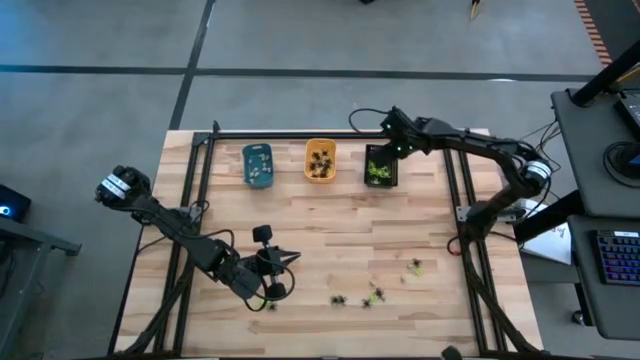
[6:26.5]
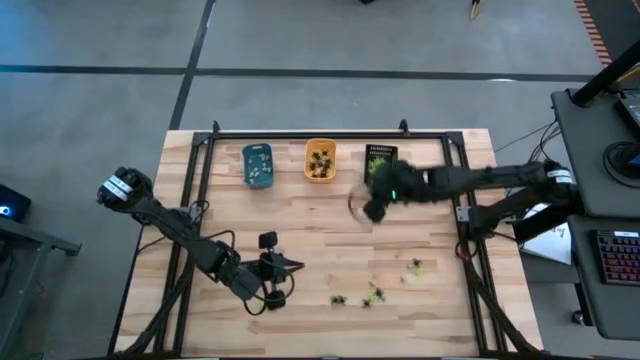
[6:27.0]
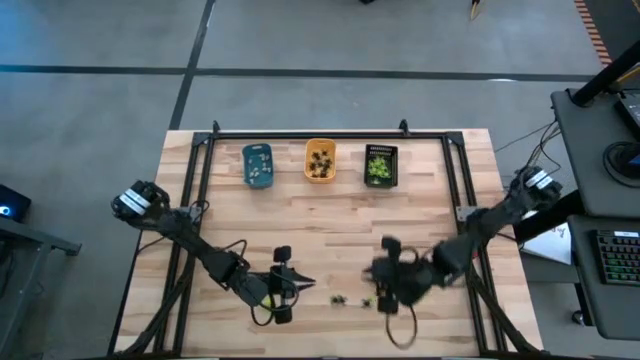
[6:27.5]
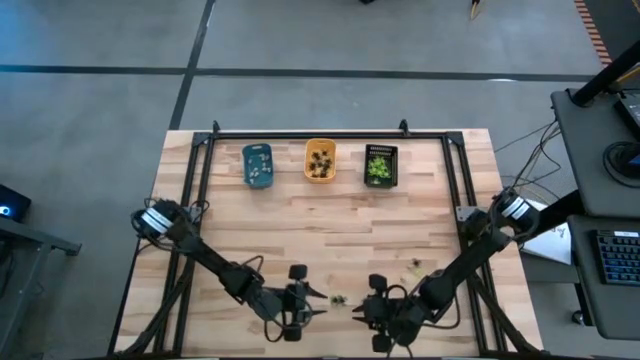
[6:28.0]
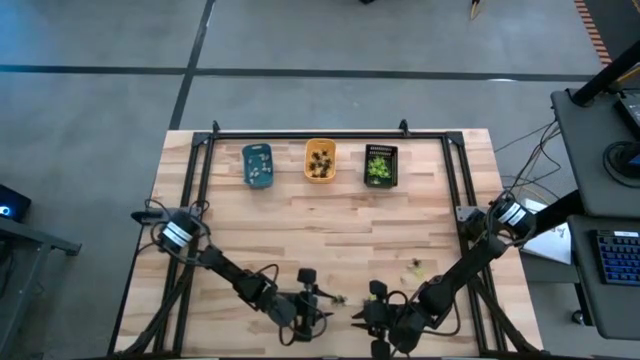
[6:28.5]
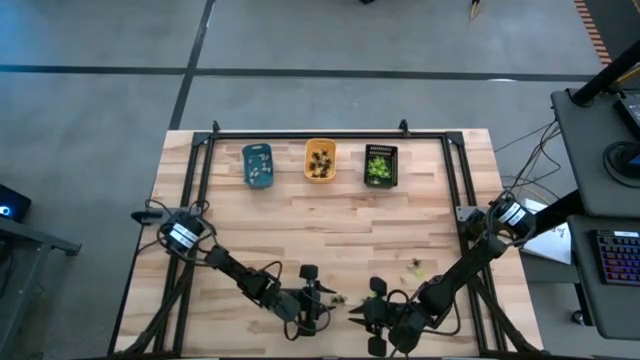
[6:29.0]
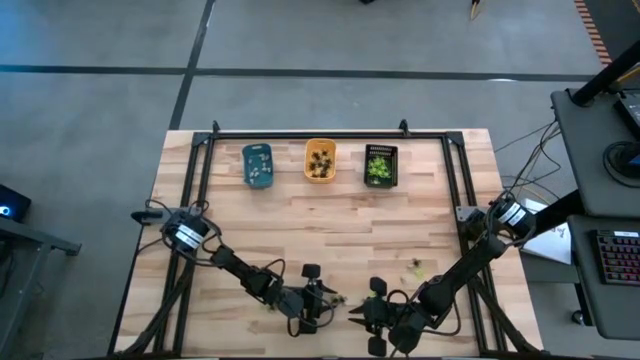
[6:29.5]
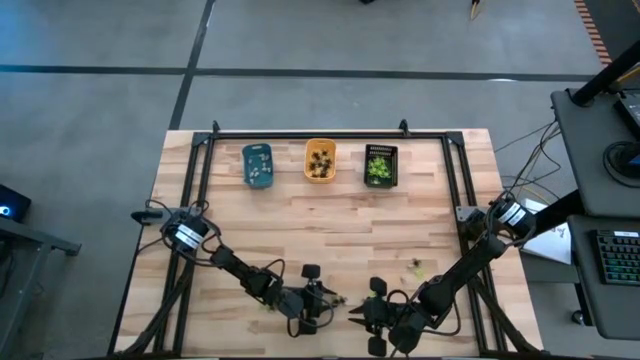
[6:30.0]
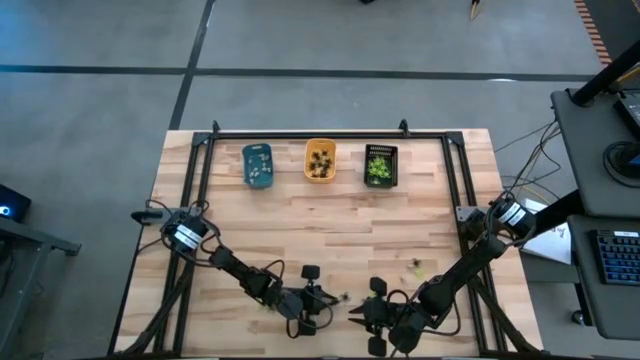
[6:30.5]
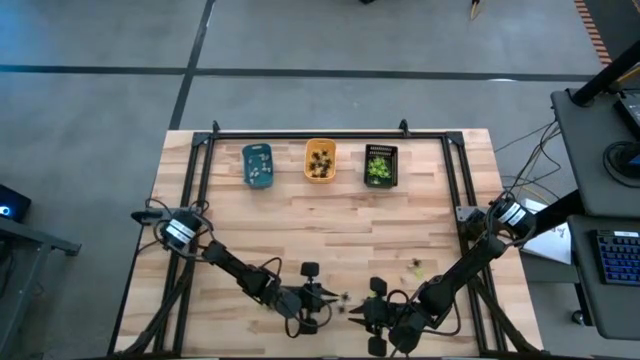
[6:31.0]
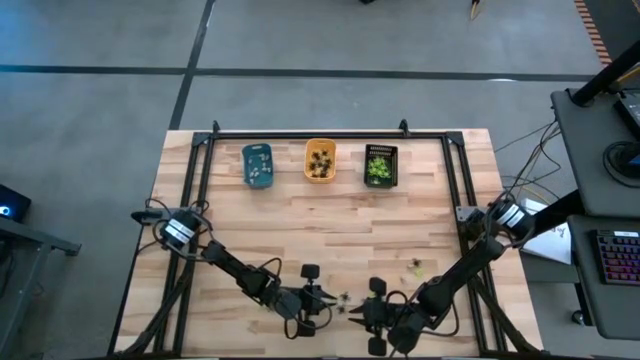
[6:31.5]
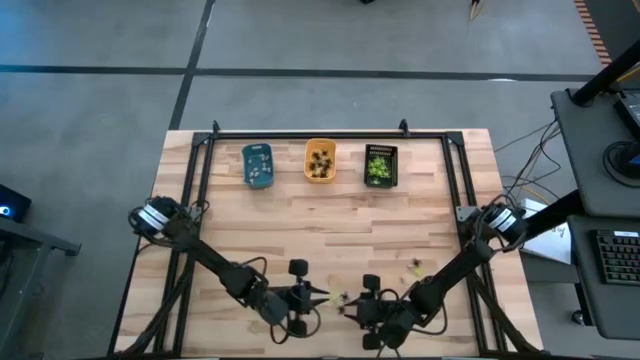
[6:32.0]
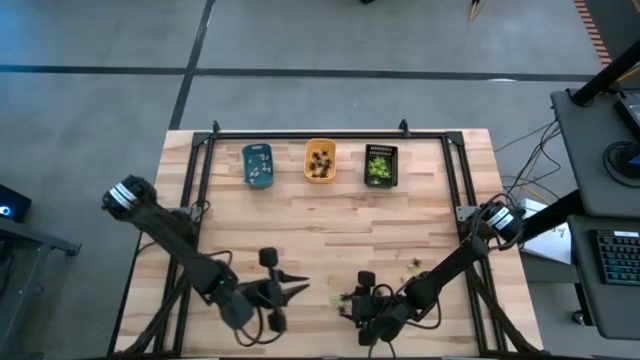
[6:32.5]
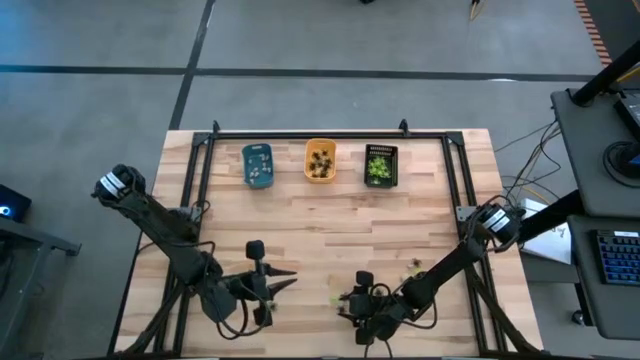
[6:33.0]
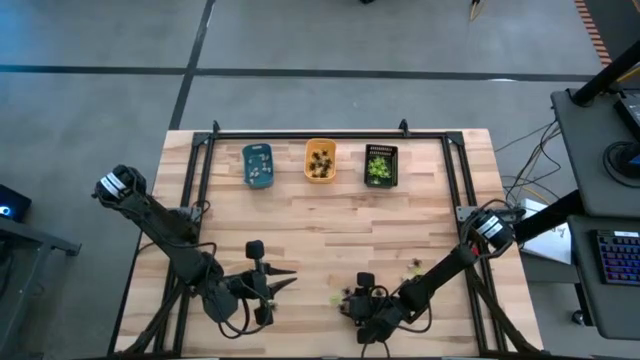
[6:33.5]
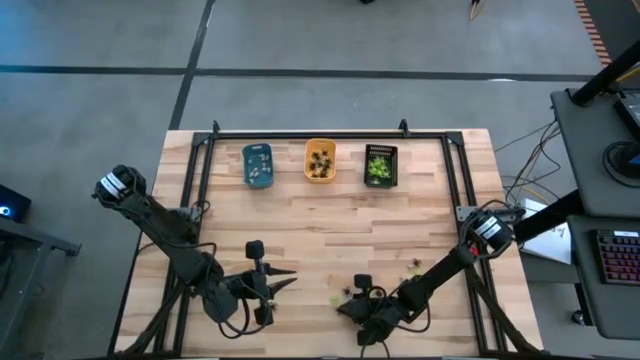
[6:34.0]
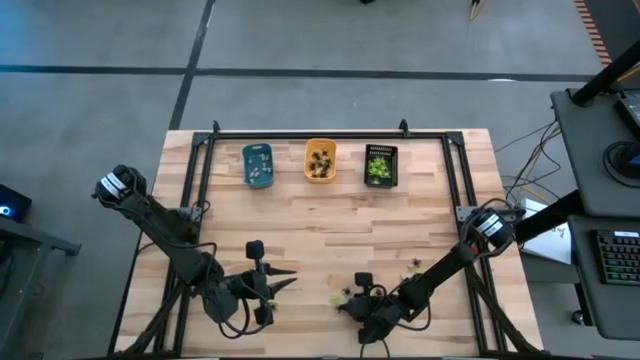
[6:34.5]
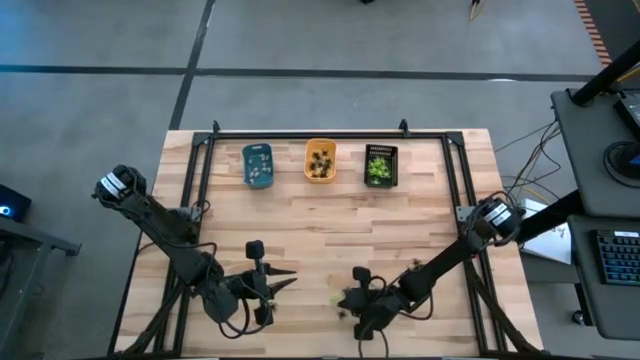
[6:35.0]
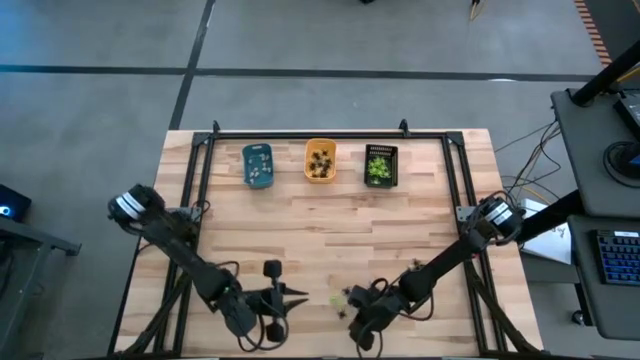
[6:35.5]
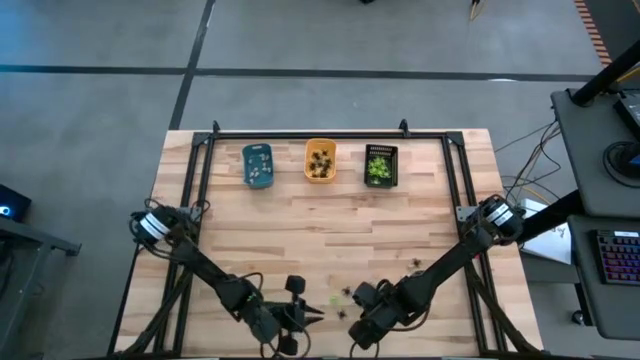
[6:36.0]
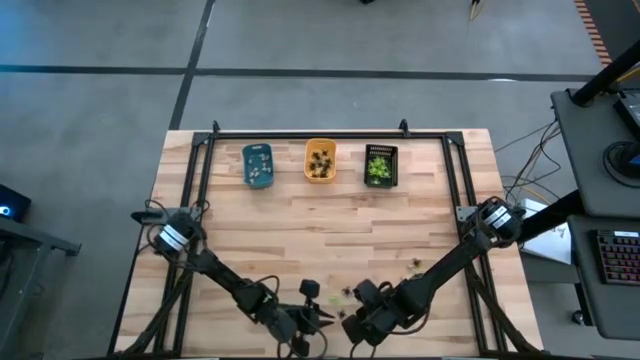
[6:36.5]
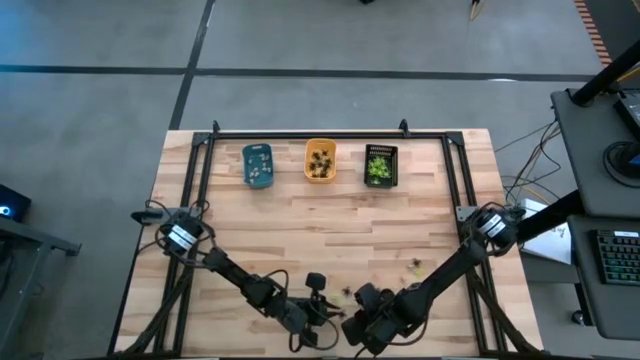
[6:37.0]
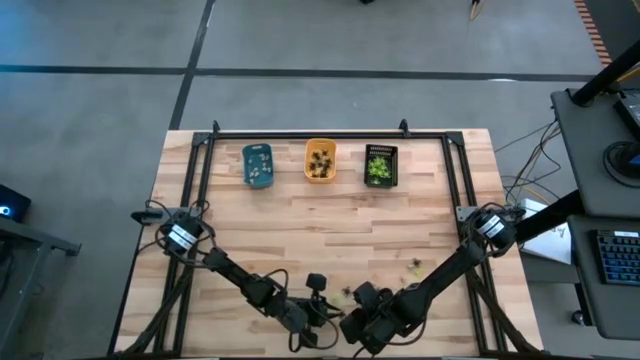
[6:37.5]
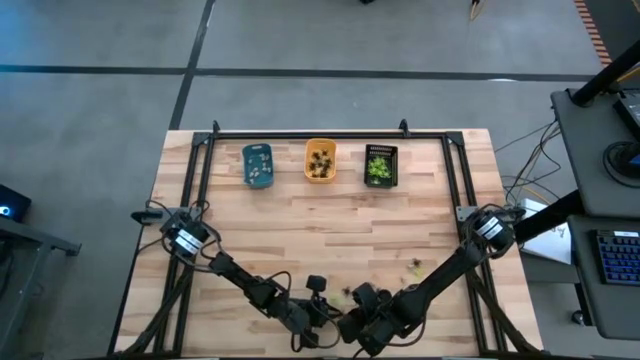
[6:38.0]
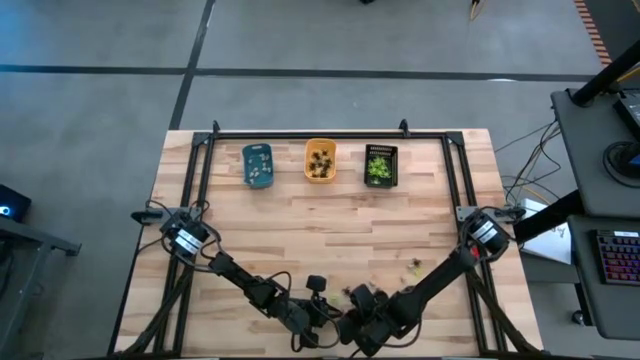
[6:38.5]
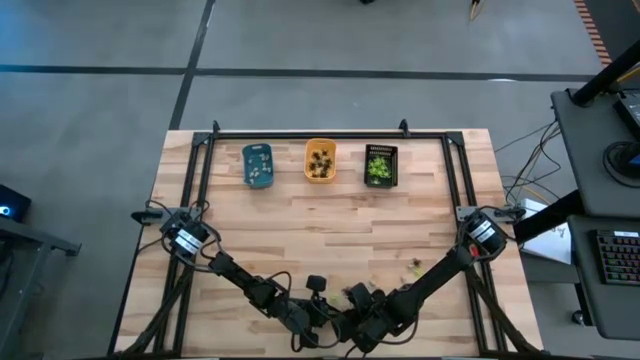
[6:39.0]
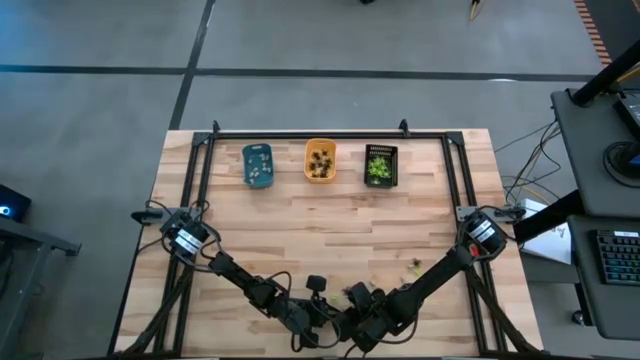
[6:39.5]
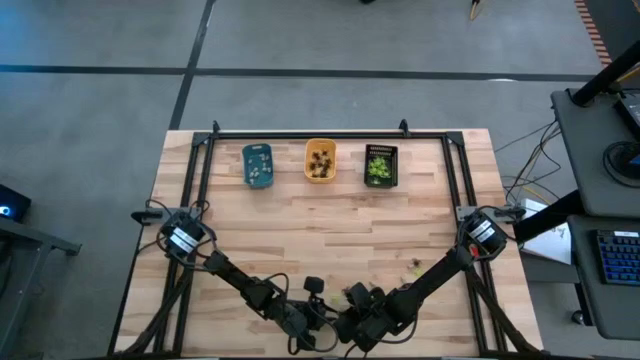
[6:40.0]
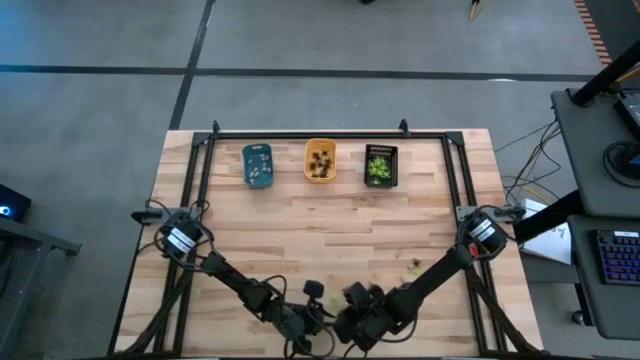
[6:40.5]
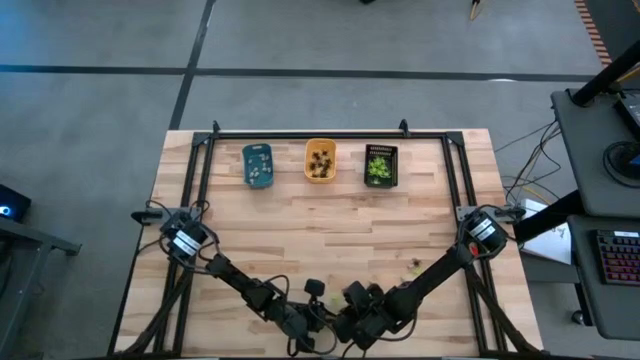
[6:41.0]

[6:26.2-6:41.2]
Task: Sort Halloween decoration
Put the black spider toy into the orange bin

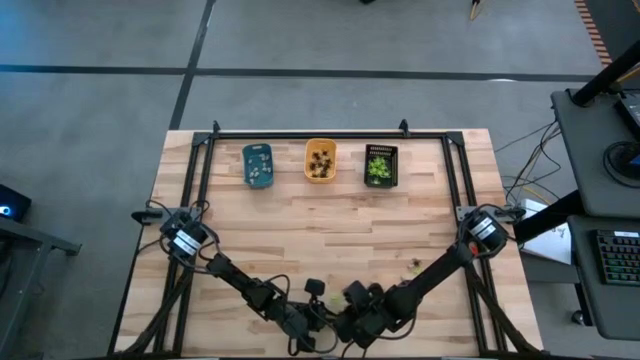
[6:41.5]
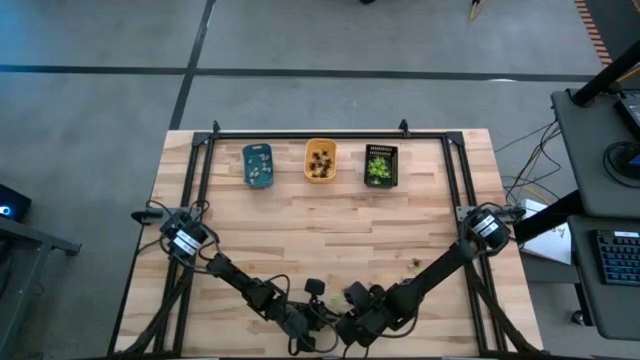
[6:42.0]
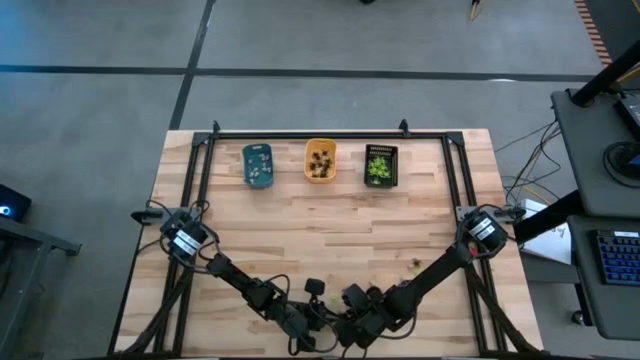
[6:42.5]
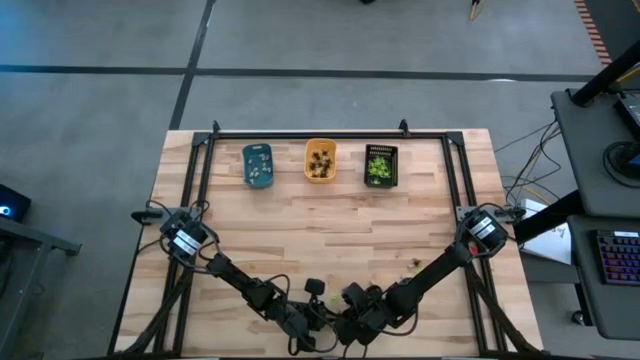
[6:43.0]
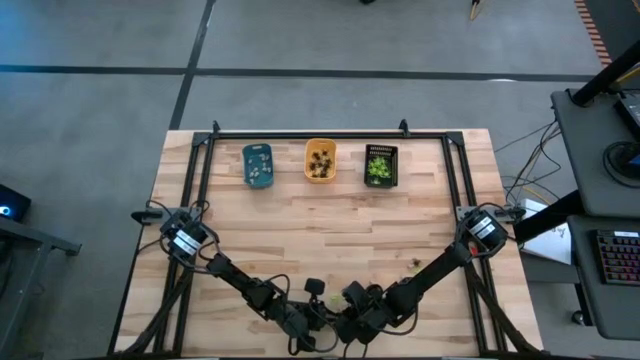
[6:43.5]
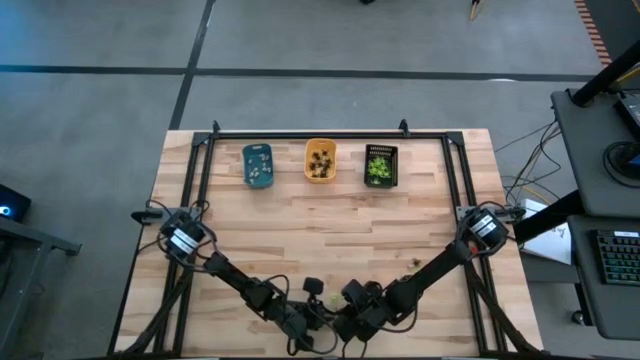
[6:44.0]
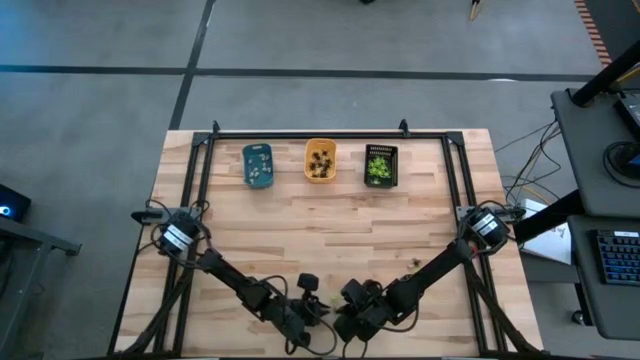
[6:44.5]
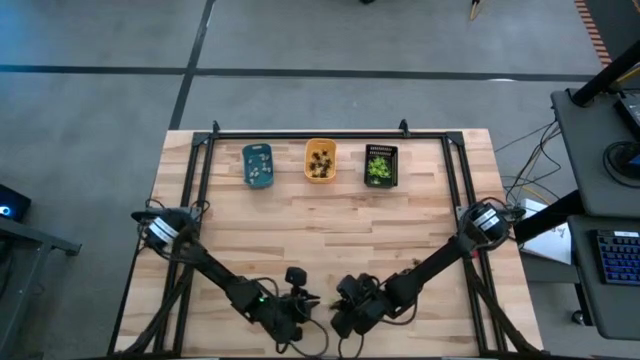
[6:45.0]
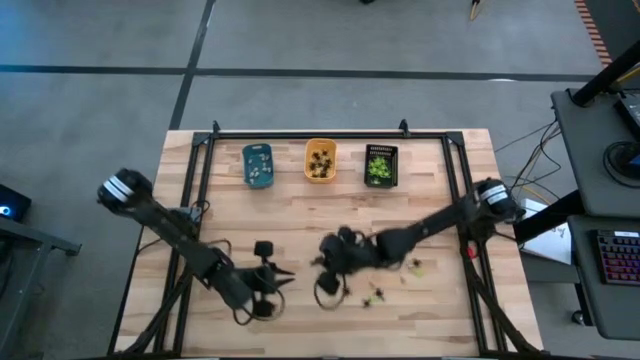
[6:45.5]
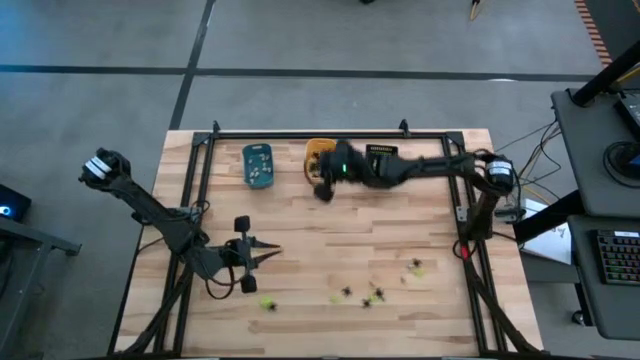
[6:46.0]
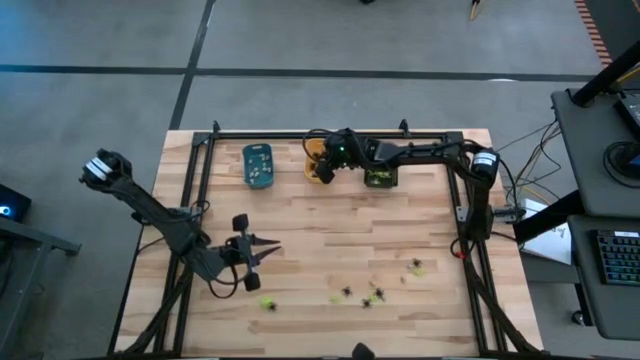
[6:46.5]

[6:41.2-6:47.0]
Put the black spider toy into the orange bin
